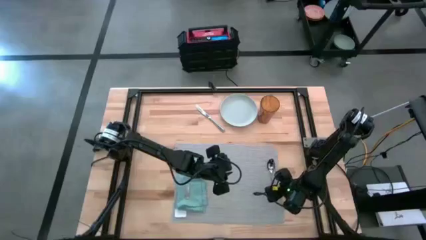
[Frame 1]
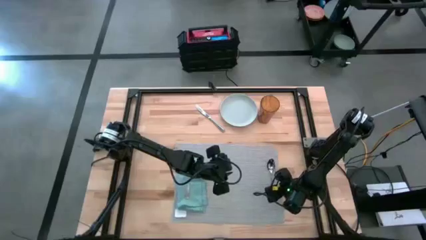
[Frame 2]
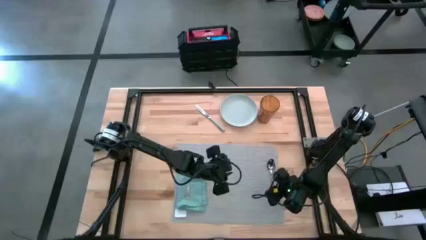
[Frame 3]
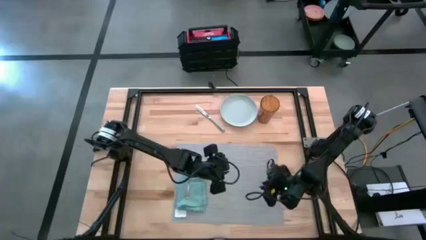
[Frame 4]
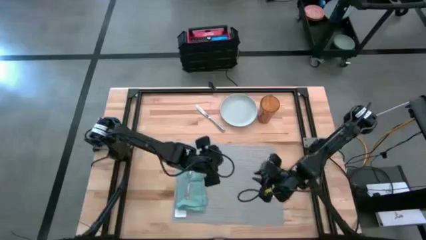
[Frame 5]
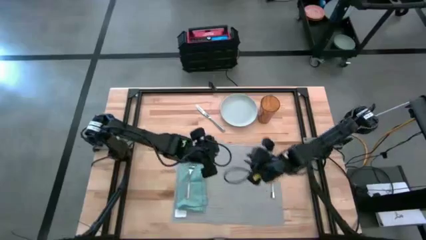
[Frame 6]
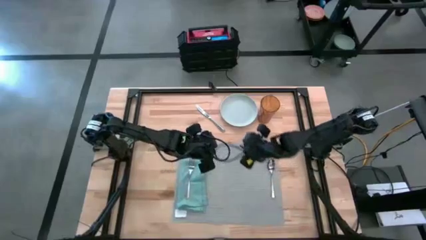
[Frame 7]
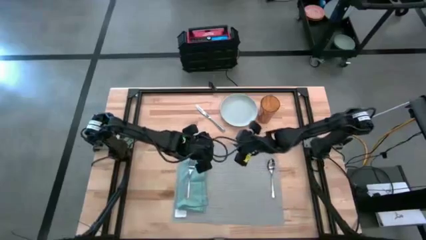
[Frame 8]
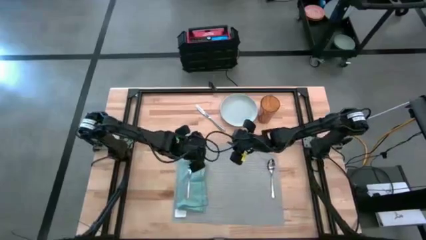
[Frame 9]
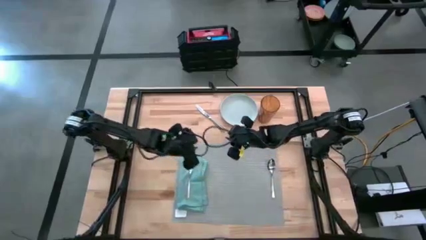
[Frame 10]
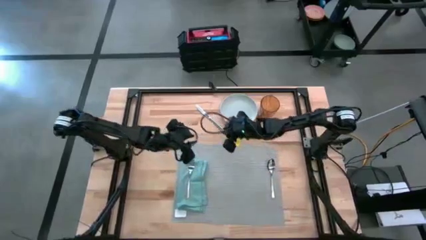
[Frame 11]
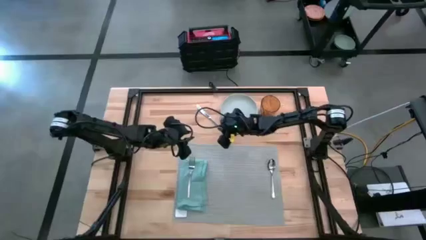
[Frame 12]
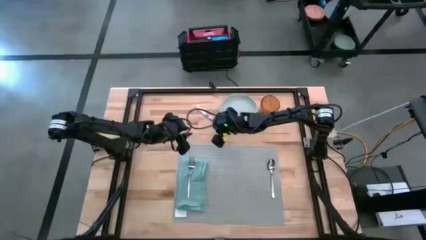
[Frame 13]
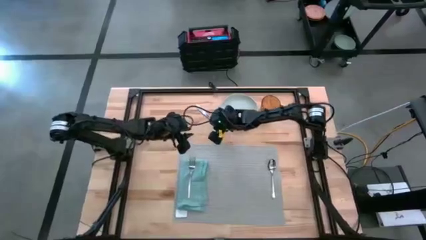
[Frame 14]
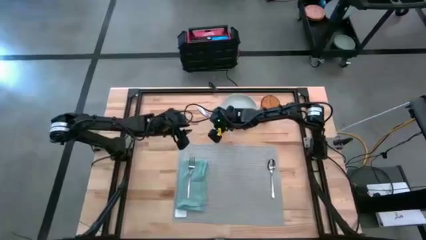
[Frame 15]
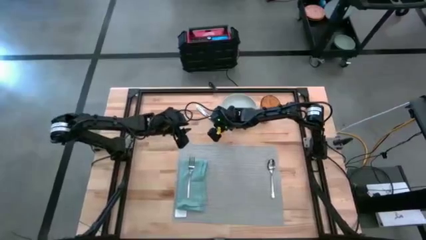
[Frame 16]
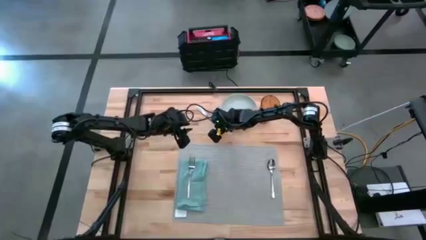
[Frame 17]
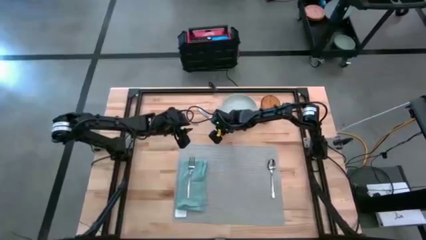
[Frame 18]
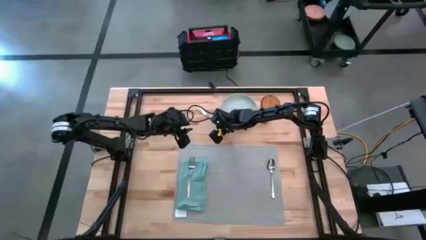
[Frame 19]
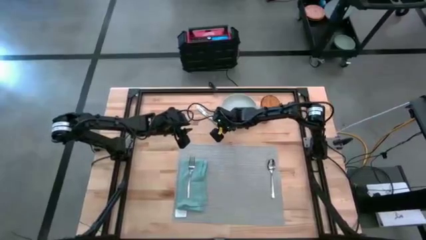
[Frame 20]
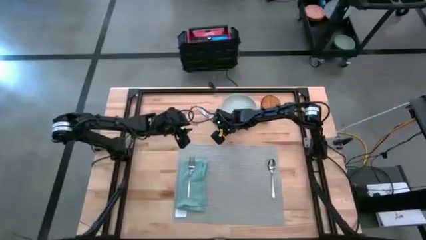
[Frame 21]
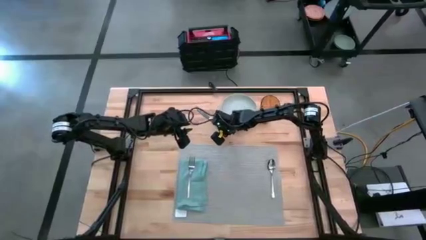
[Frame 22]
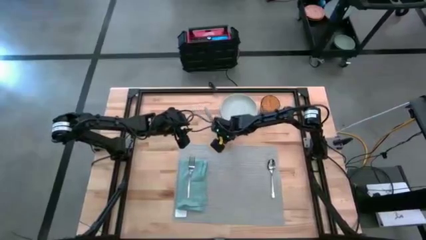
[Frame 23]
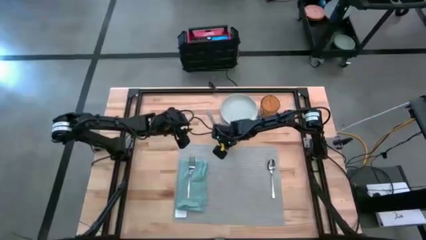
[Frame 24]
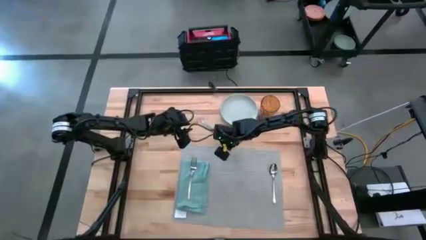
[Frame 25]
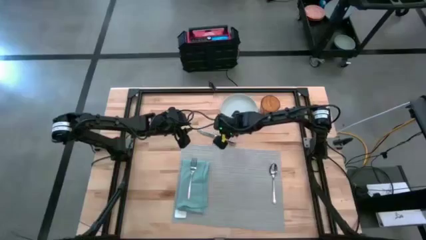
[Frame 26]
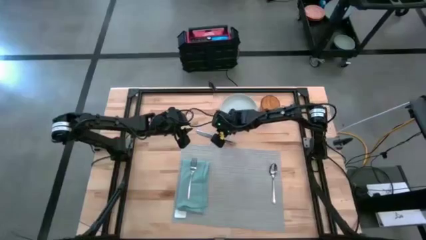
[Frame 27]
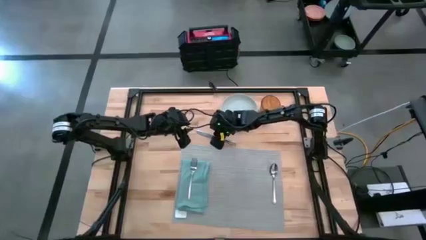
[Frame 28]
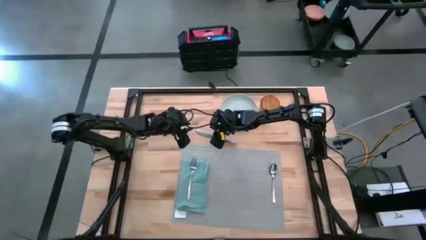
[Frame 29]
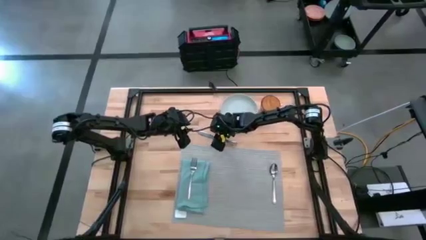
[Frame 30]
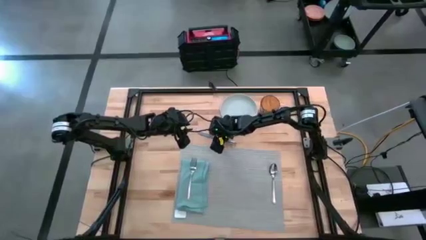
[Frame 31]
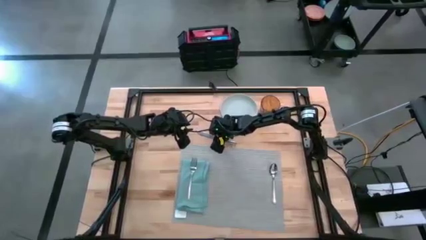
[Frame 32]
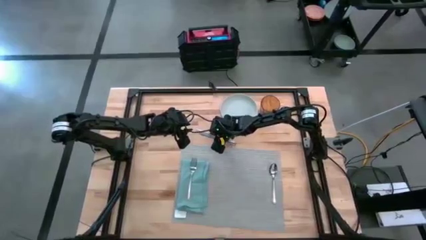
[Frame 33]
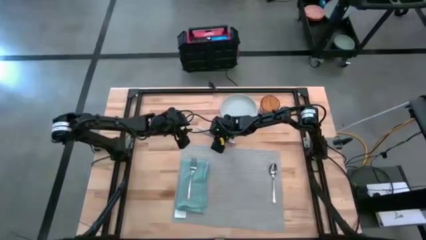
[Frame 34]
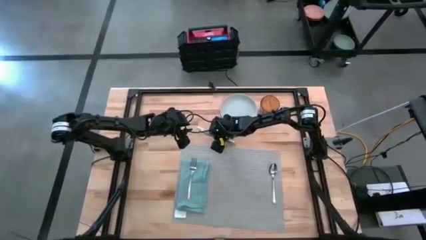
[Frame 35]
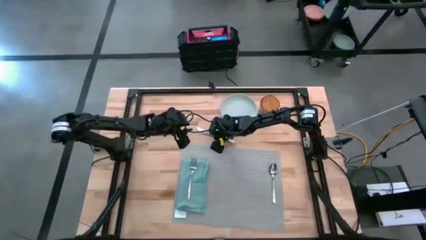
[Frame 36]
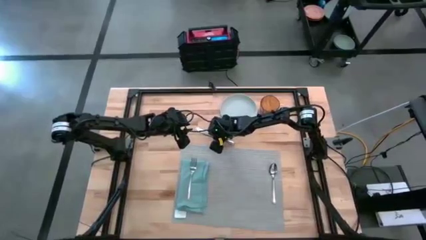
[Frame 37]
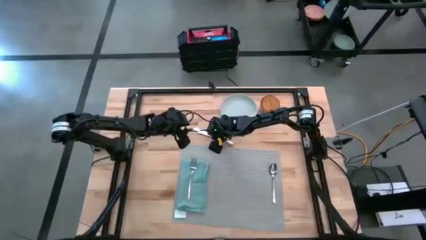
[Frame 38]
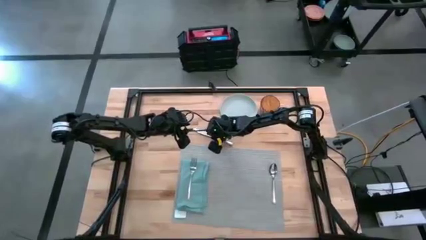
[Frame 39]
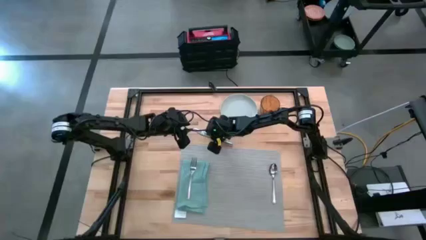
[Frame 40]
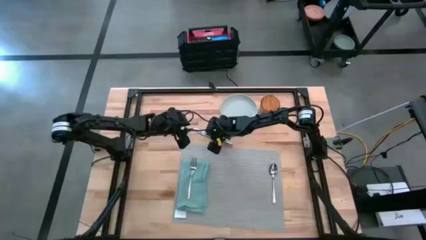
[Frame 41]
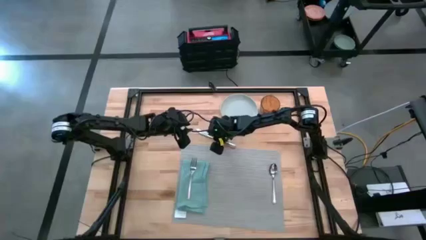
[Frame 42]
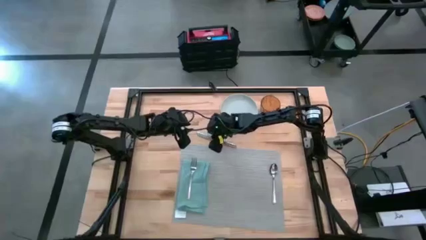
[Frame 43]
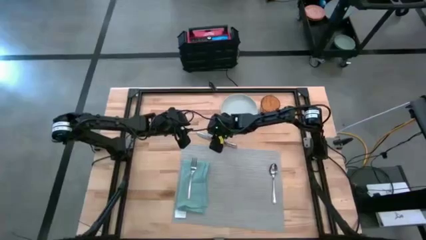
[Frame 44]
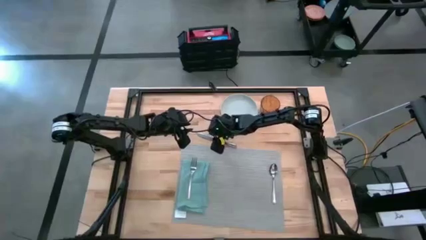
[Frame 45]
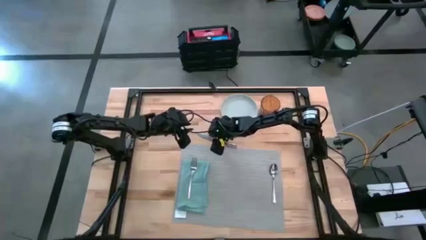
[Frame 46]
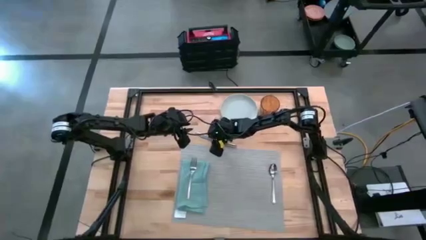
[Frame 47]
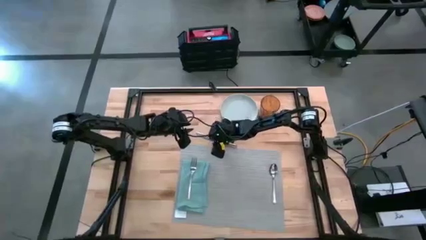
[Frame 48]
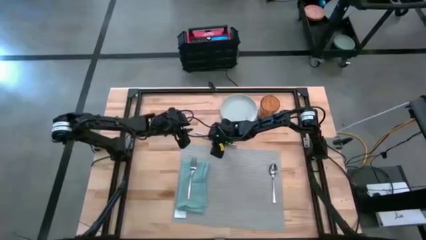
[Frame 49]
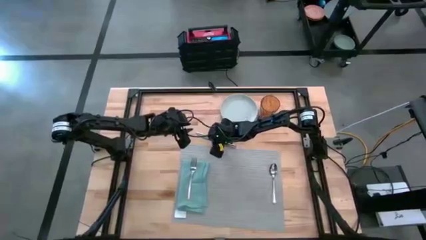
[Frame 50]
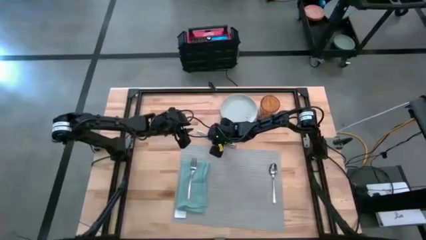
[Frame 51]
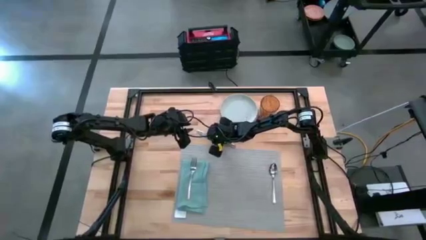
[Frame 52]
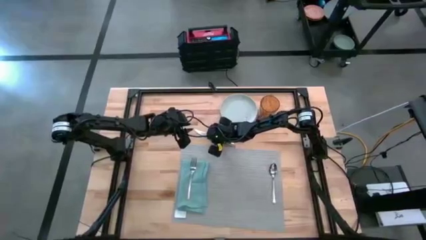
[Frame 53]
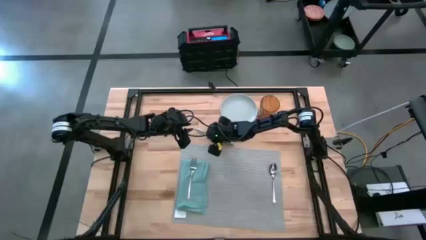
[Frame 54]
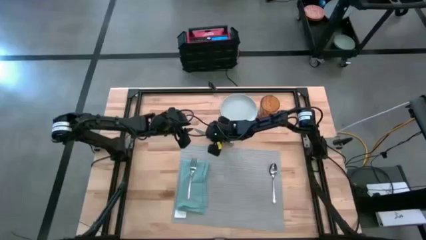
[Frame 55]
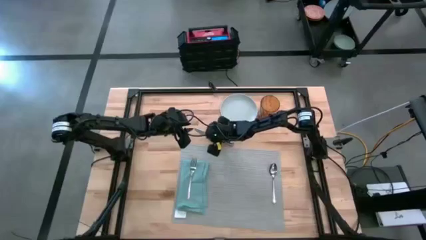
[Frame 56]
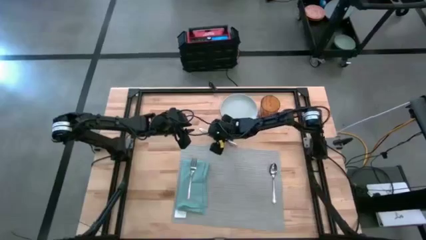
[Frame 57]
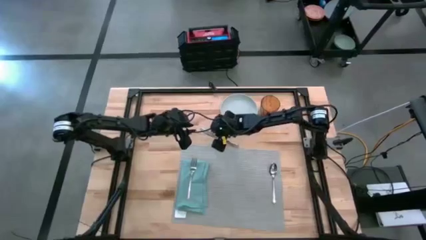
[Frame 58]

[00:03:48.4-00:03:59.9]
Task: Set table place
Put the silver knife on the gray placemat, to the left of the silver spoon

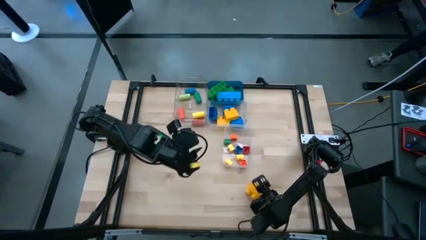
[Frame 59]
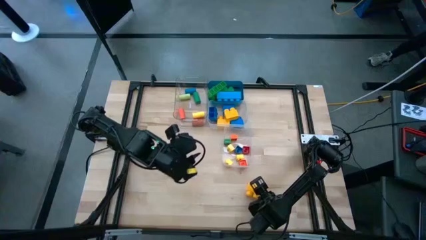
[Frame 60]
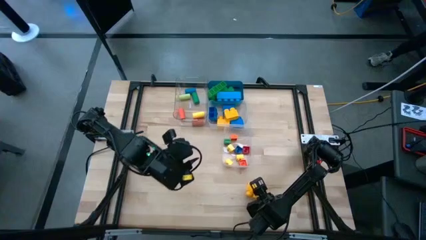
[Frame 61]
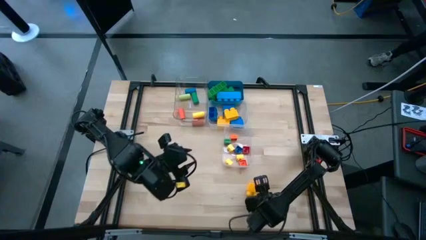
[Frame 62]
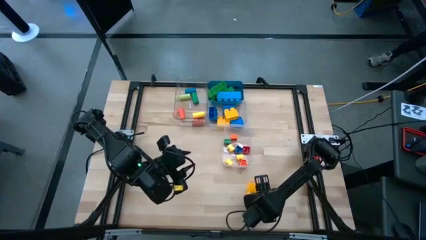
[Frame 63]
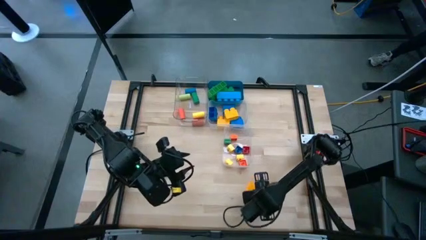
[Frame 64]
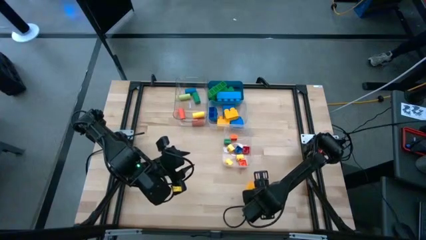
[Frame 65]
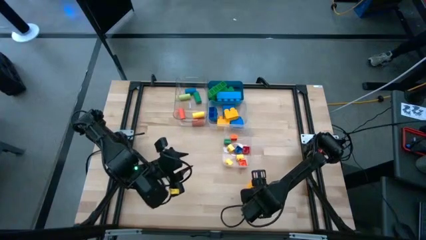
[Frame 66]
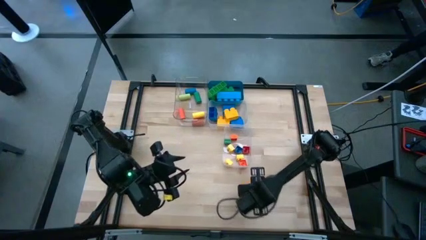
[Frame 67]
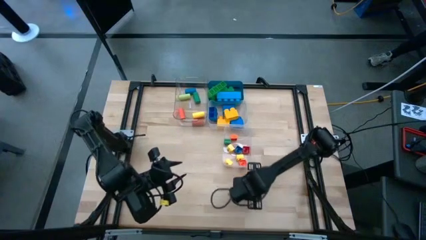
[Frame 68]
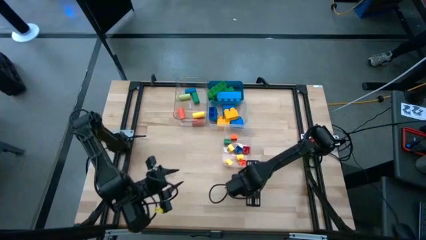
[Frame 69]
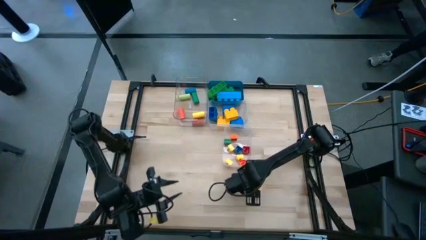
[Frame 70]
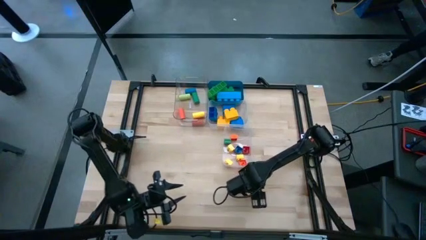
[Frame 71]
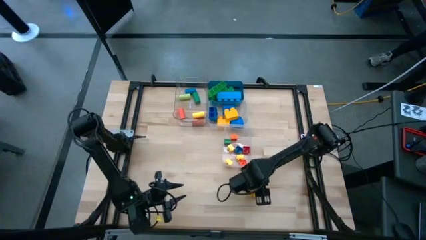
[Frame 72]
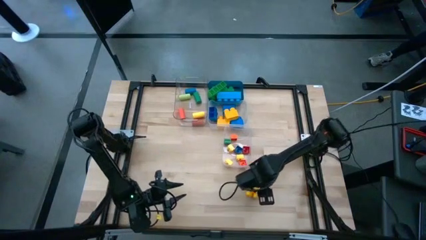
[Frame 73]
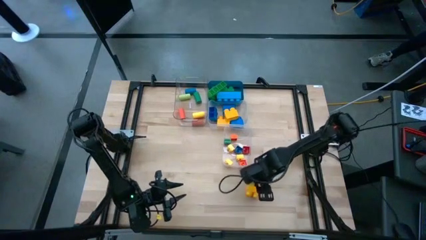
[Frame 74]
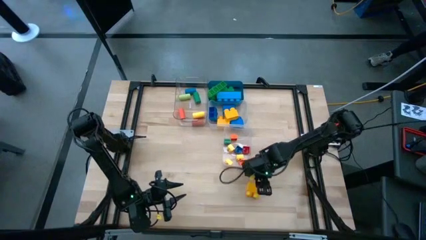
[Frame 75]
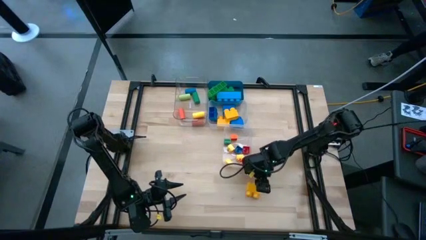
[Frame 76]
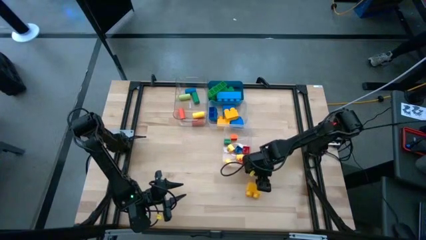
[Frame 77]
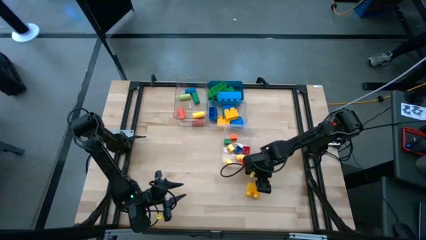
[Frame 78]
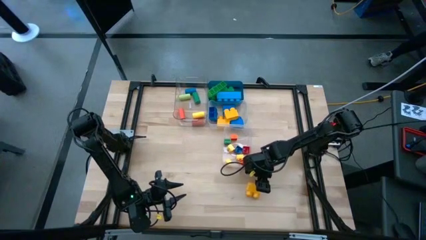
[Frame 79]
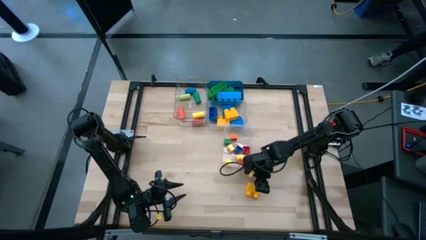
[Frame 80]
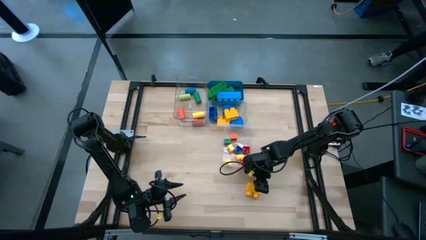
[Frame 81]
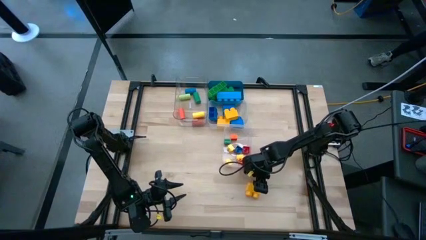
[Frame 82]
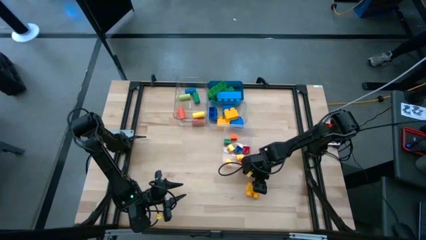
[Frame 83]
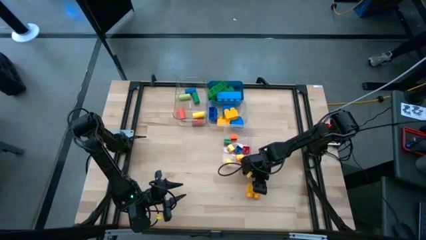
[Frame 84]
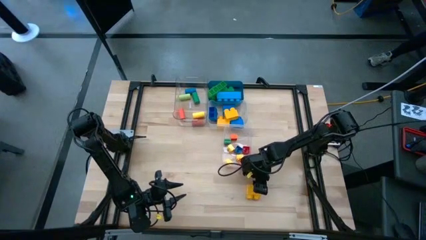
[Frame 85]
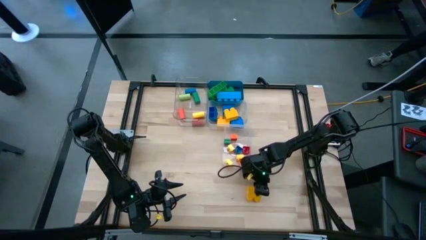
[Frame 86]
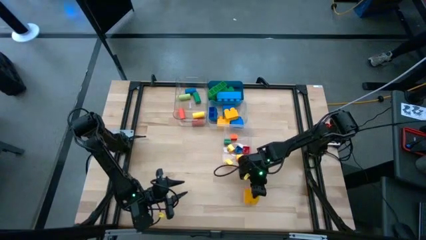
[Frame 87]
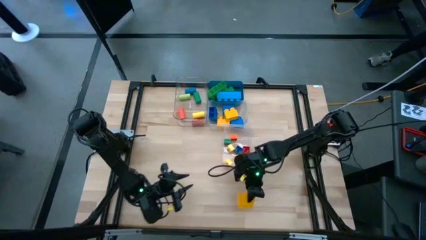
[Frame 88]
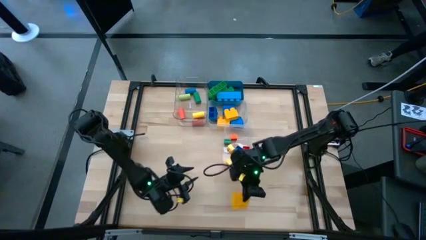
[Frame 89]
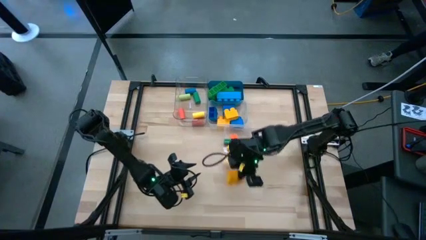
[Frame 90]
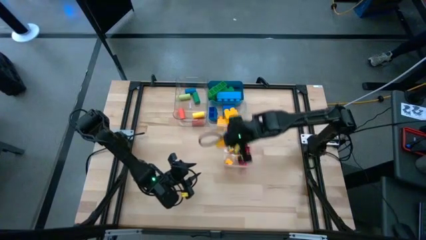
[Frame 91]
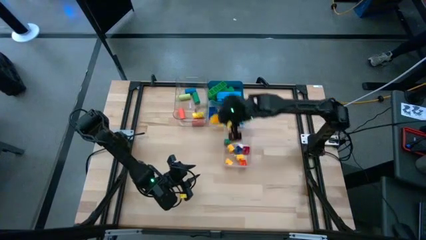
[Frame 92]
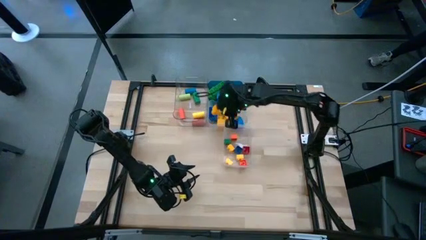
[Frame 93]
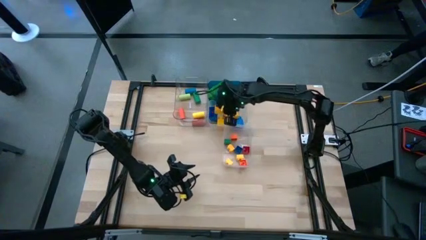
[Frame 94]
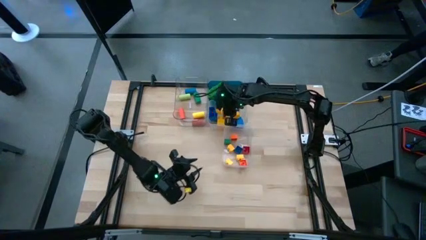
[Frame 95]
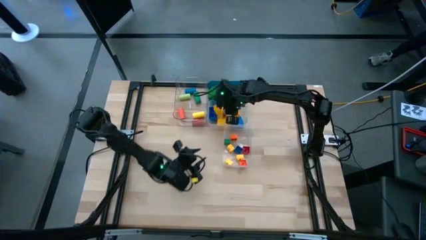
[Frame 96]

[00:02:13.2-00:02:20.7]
Task: Sort blocks by size
Put the yellow 2 stud game piece into the top right transparent bin
